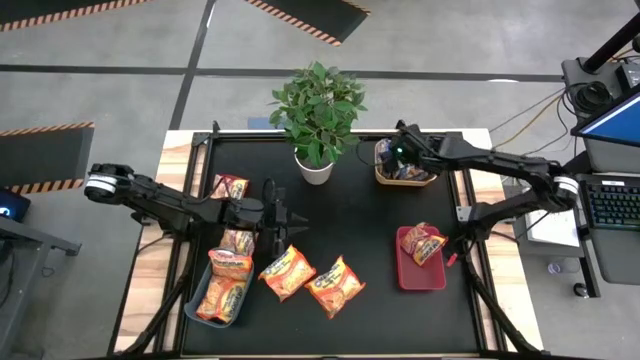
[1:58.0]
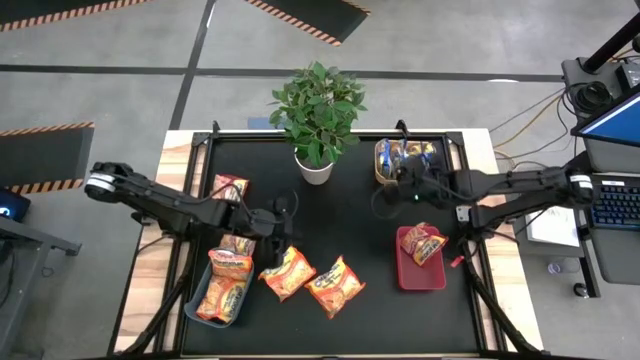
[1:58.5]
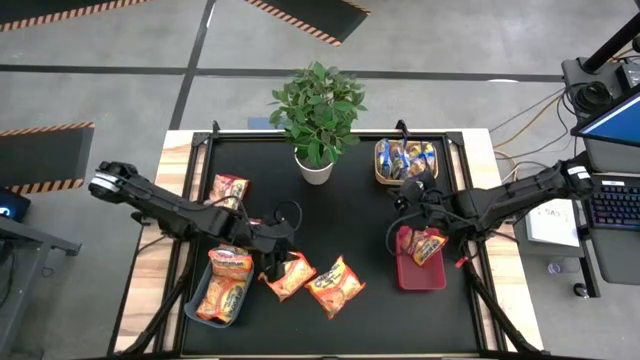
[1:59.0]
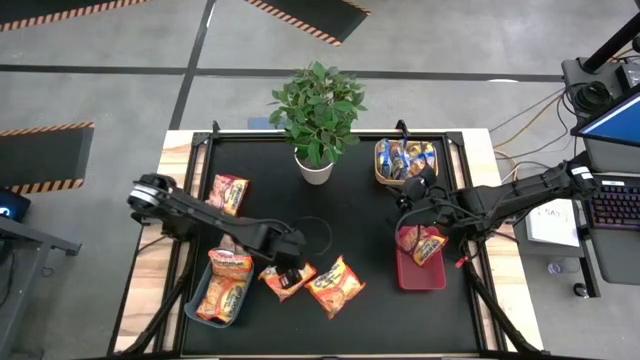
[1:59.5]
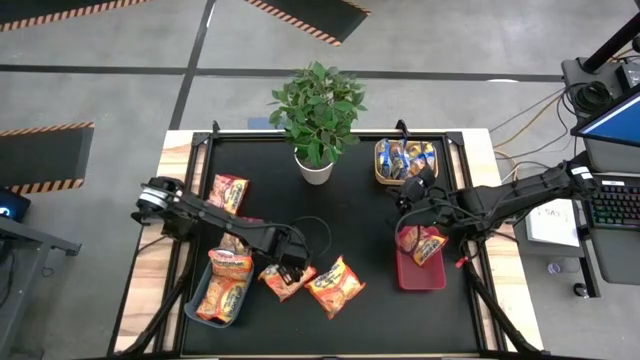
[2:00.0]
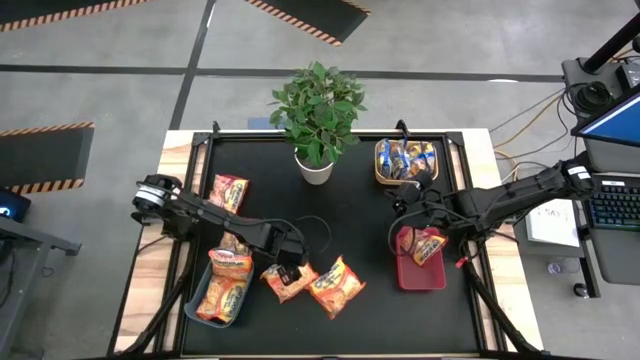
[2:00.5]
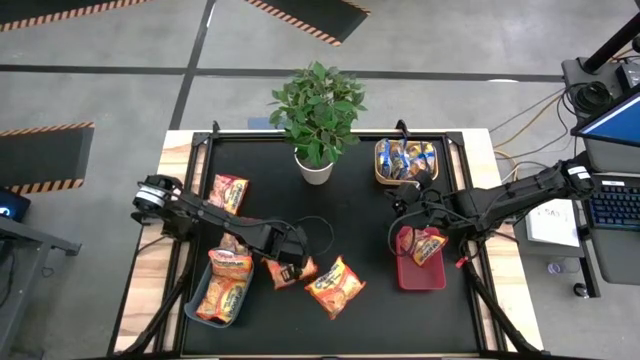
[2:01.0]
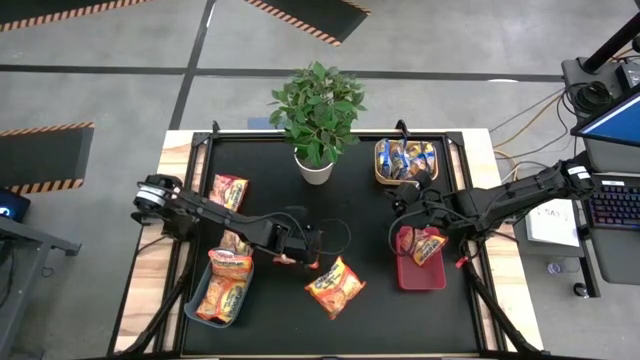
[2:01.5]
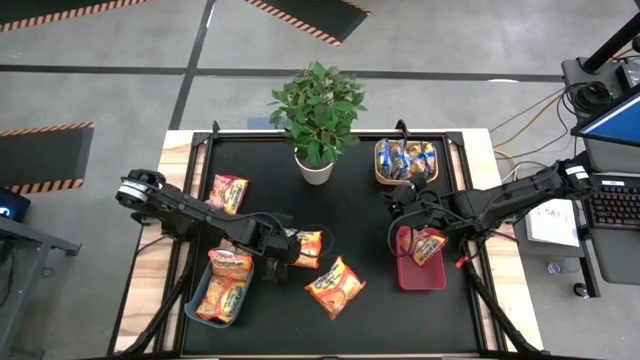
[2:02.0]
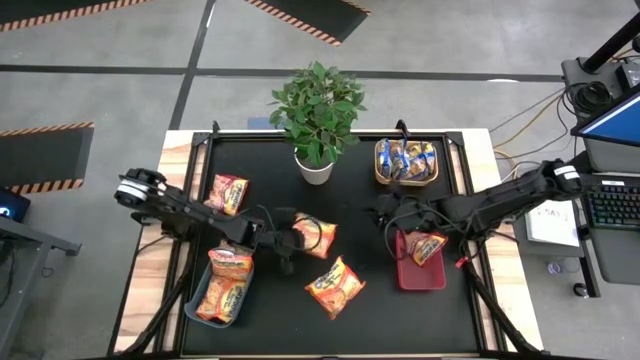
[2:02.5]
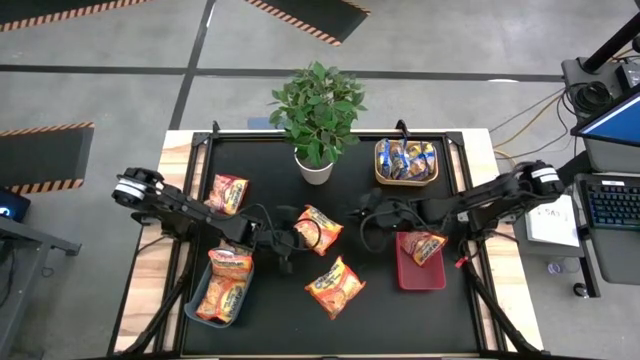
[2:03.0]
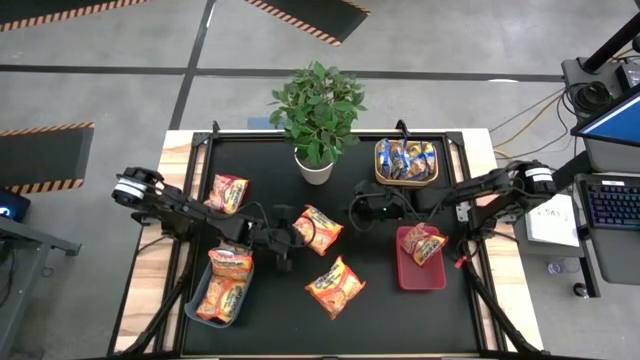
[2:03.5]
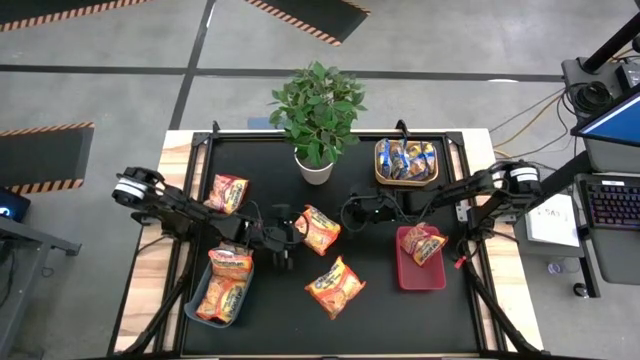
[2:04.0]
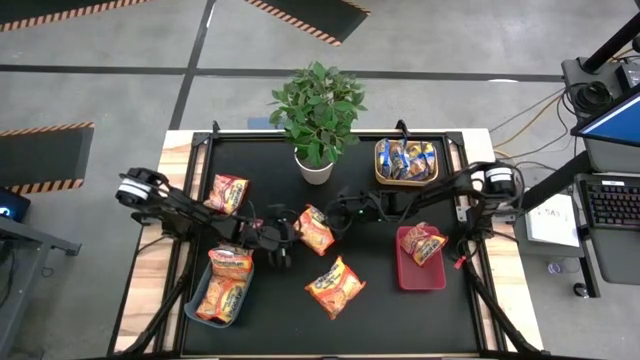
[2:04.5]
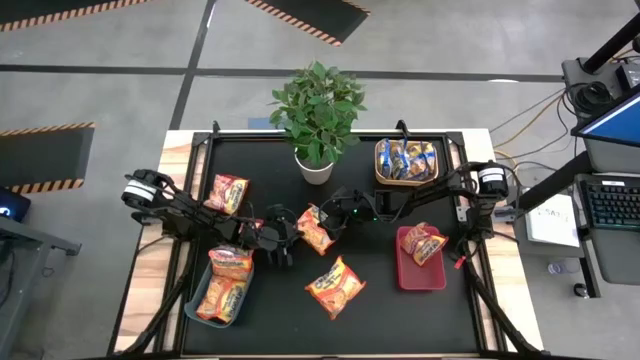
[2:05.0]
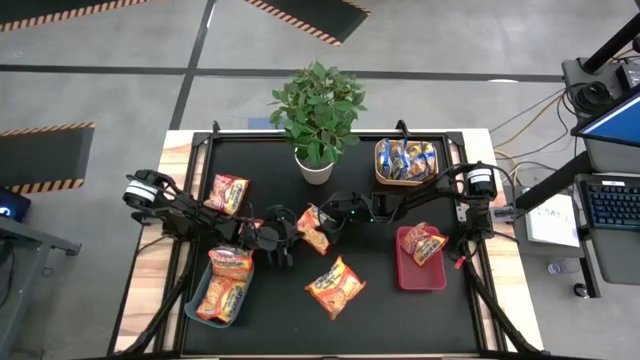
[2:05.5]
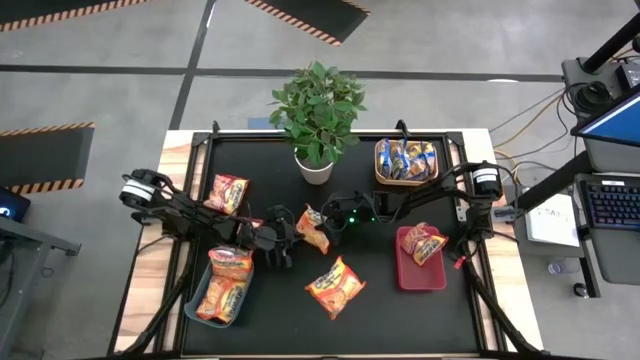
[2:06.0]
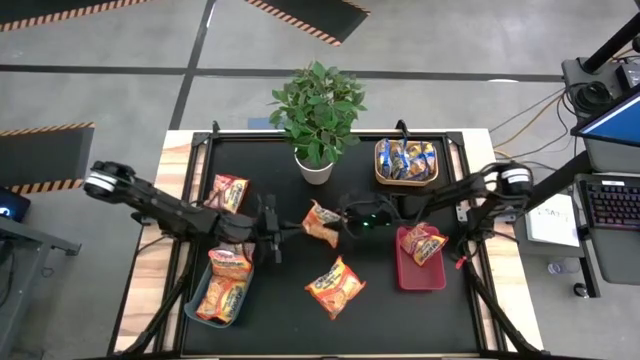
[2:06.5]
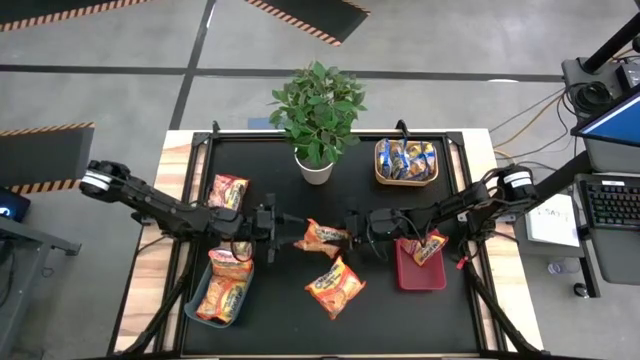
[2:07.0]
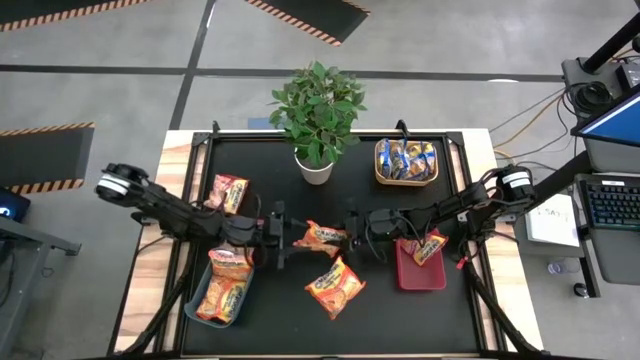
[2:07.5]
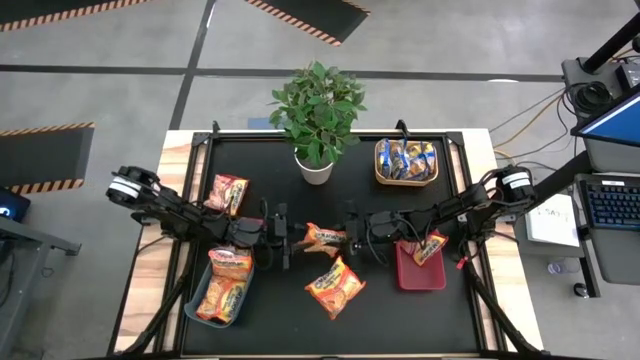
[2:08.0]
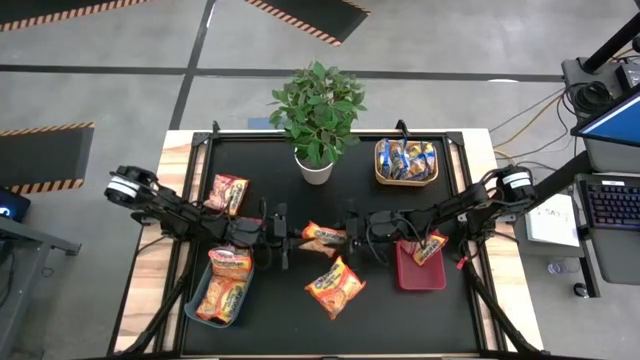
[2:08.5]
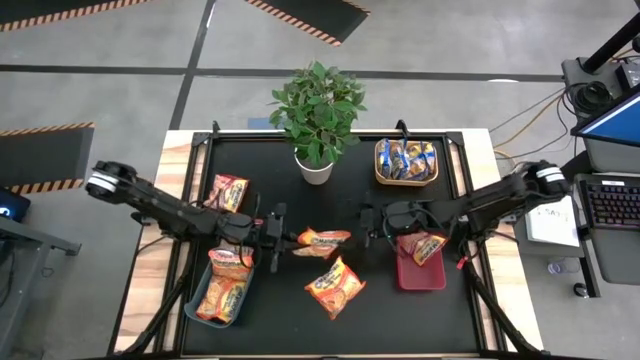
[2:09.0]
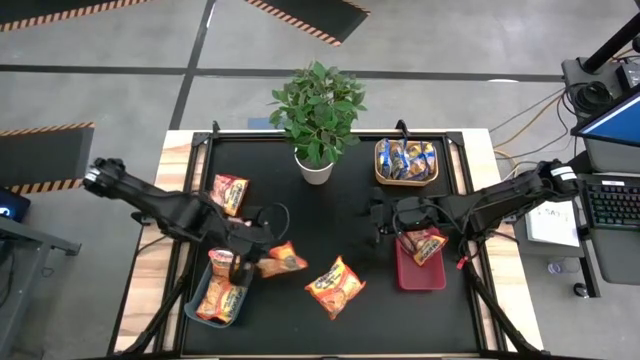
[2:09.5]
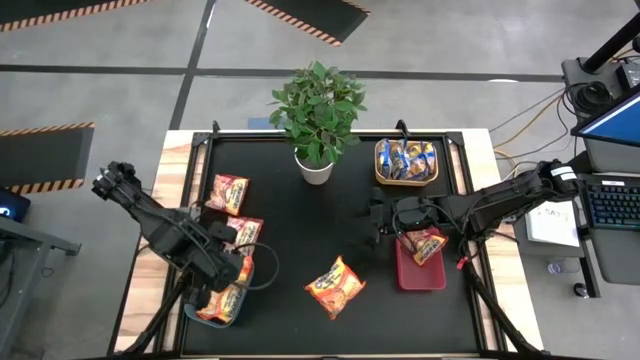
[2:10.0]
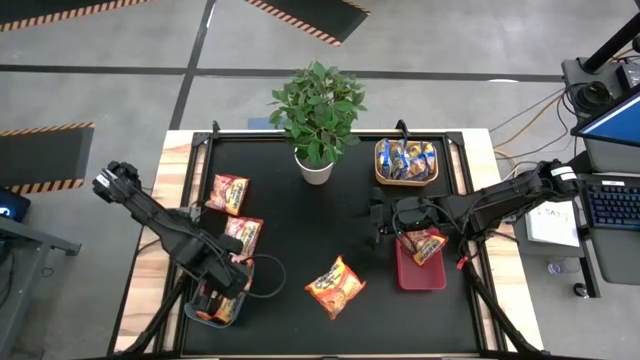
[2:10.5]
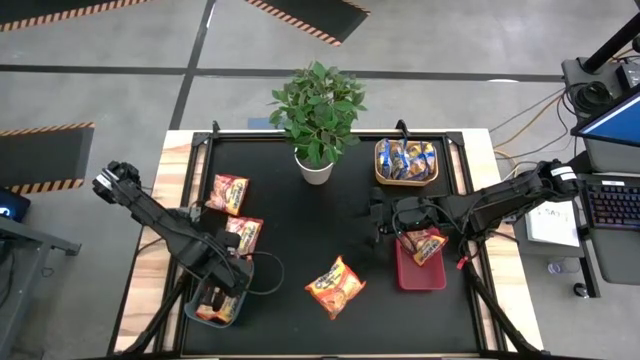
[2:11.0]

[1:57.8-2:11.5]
Task: Sort Maruchan noodles
Put the orange noodle pack into the blue bin

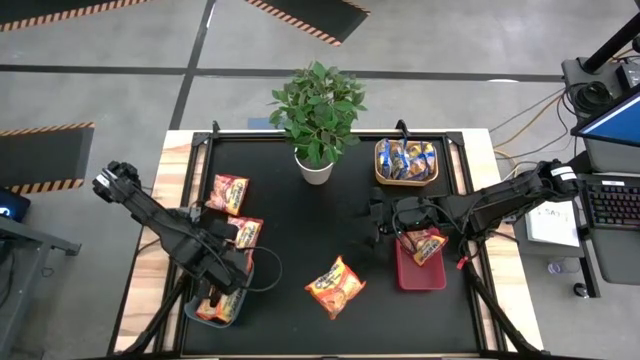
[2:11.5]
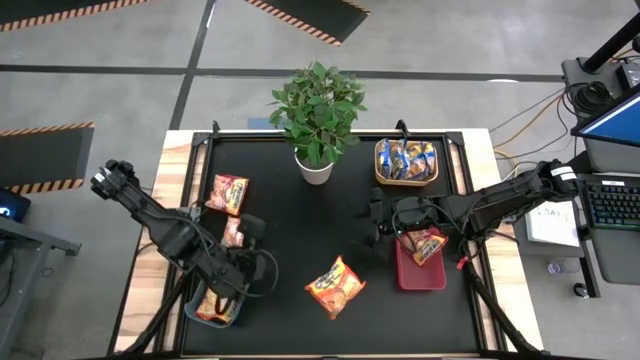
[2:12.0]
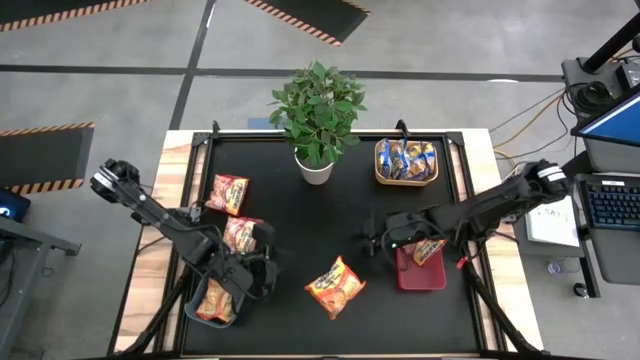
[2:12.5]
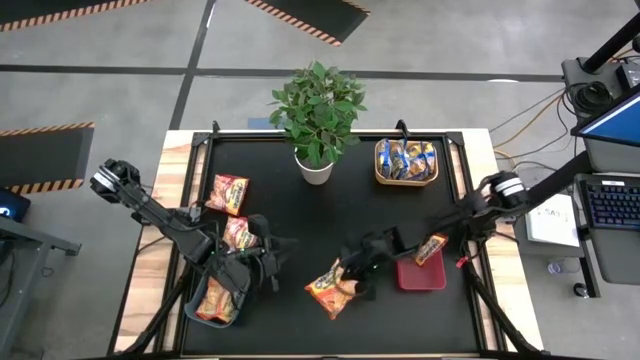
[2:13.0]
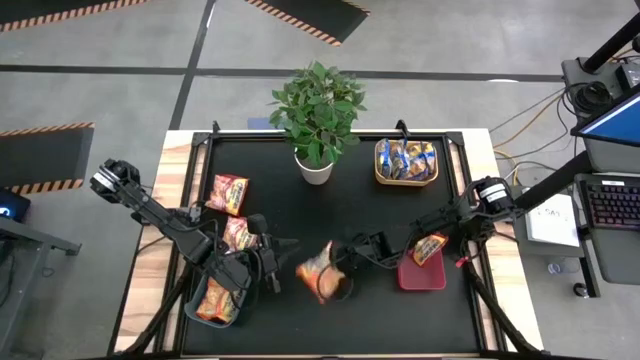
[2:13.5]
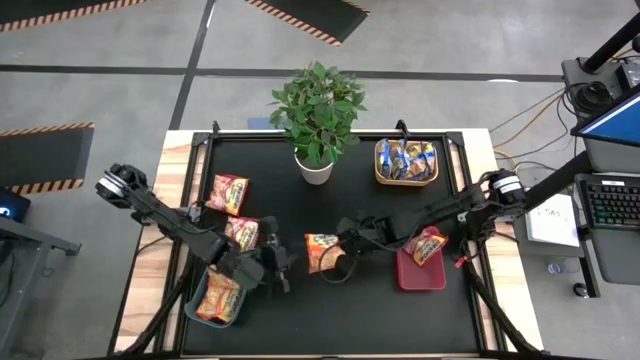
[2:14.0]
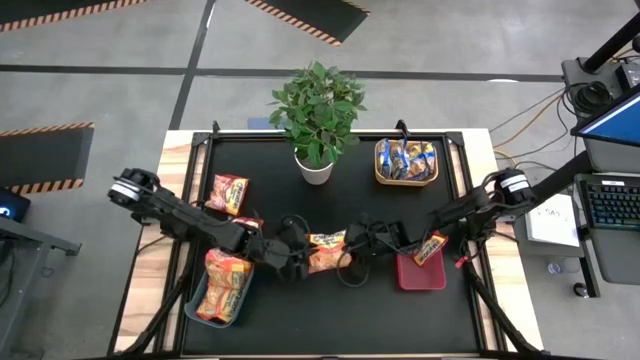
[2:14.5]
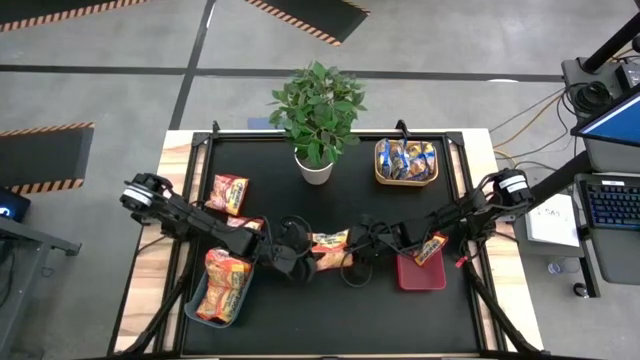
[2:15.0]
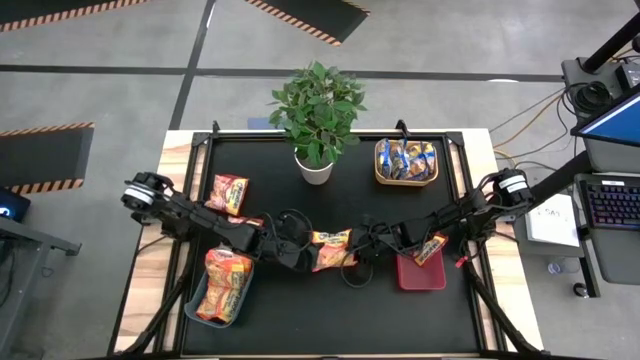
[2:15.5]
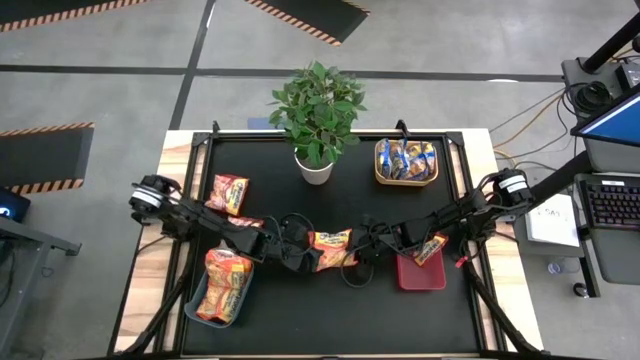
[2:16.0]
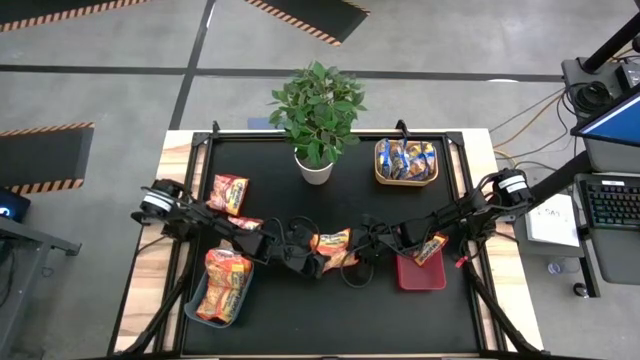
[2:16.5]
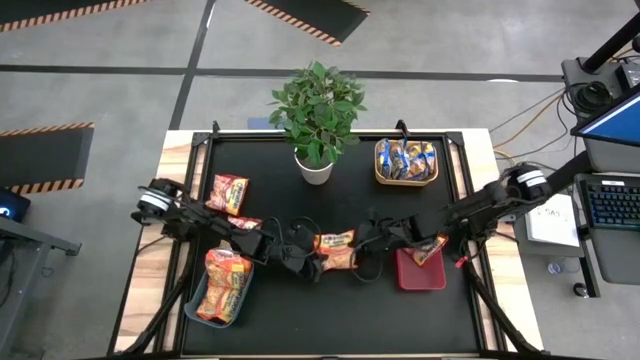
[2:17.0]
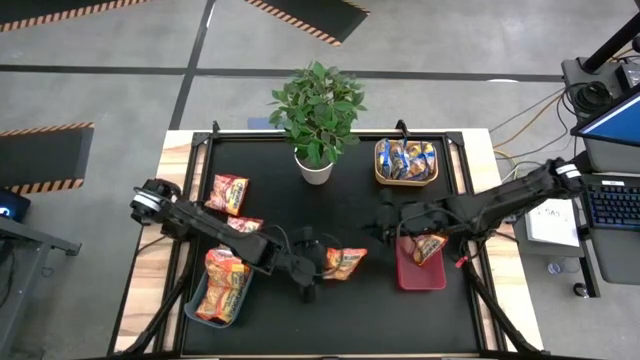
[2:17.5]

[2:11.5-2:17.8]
Put the orange noodle pack into the blue bin

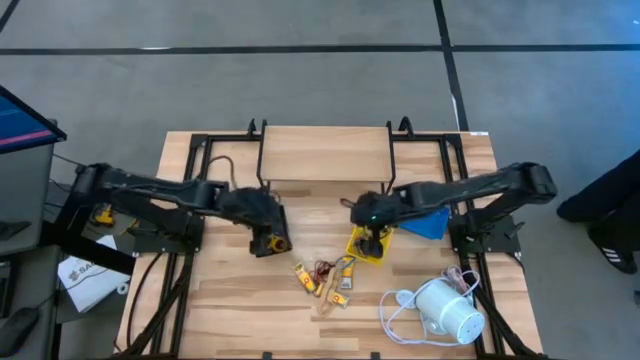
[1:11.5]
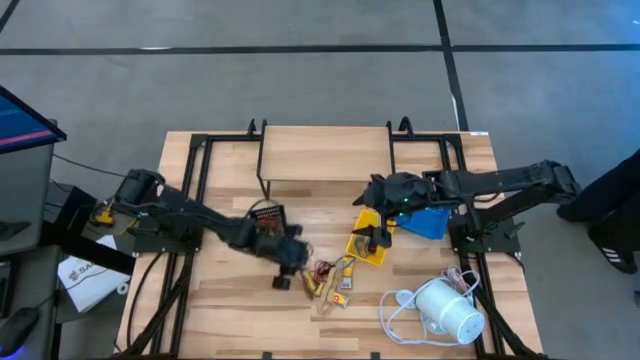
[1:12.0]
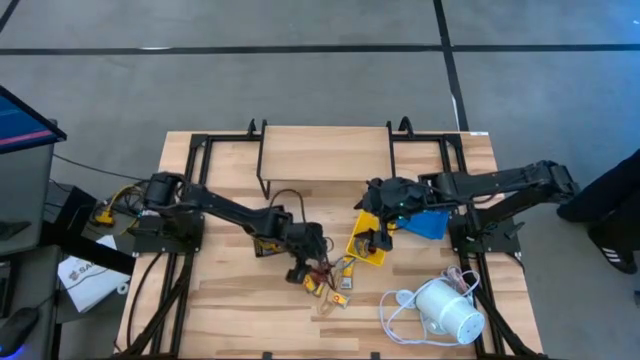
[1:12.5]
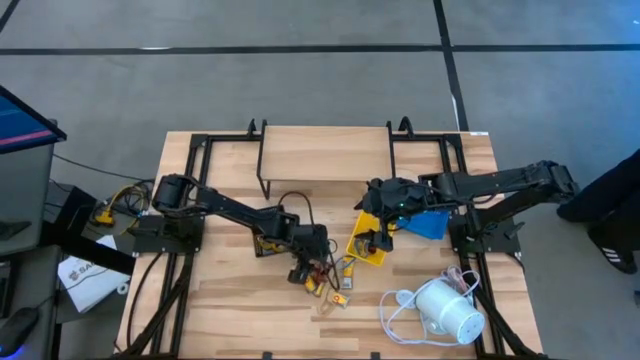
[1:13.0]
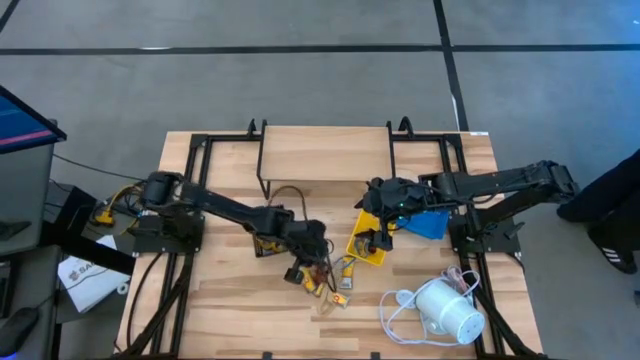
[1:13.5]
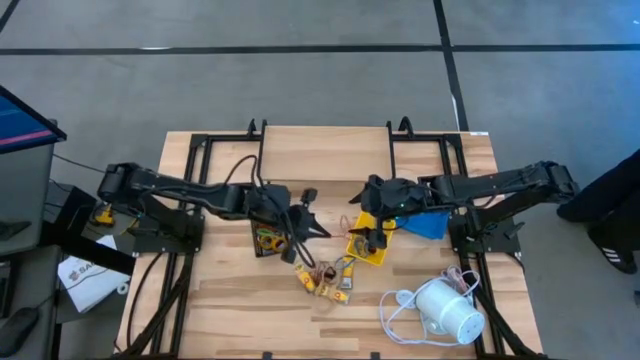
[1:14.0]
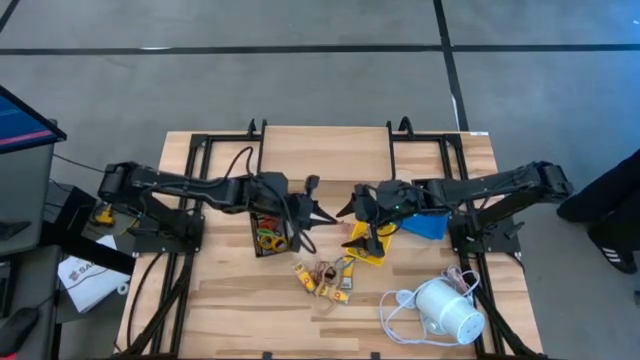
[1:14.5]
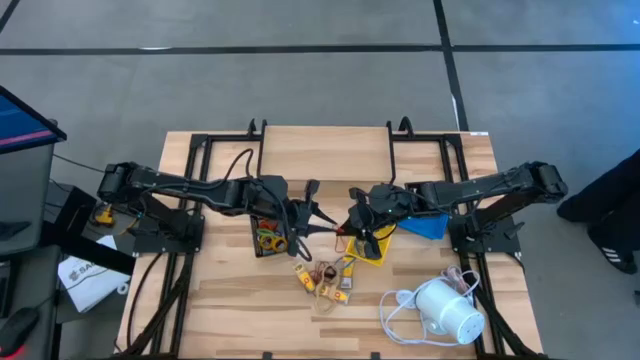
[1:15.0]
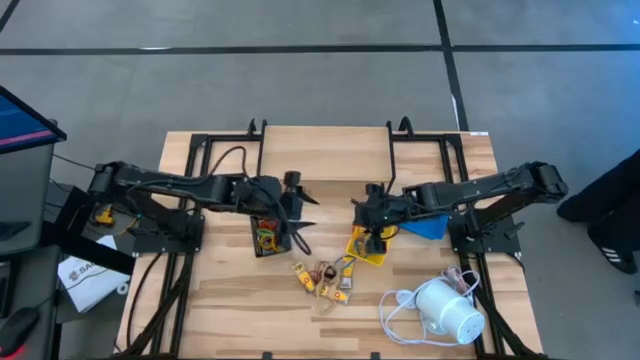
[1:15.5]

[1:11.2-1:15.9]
Task: Pick & Place Office Desk Supplies
Put the red rubber band into the yellow bin
